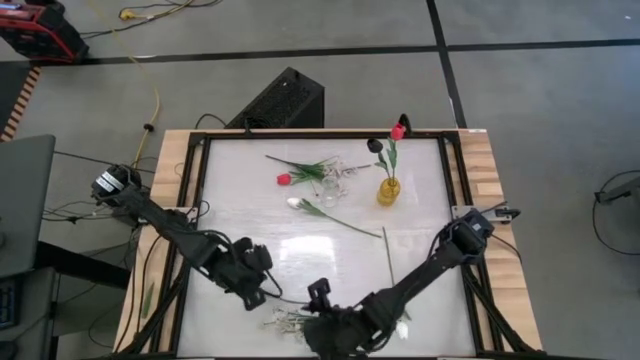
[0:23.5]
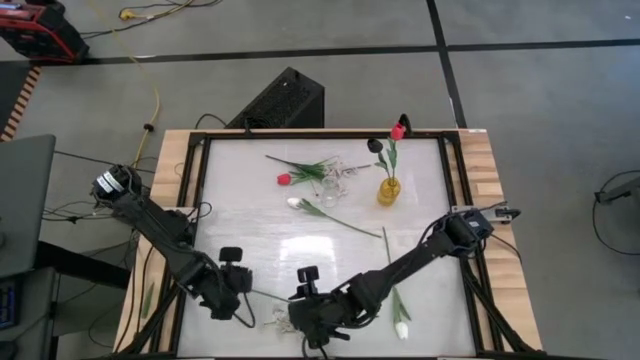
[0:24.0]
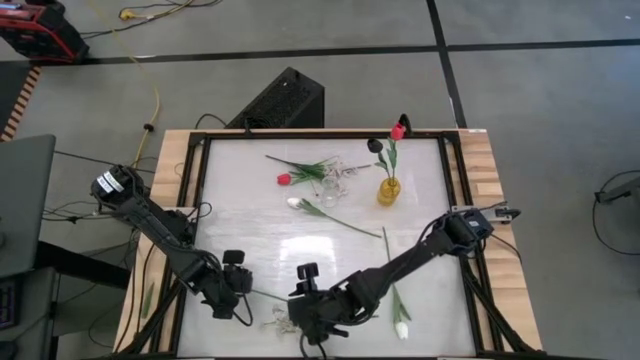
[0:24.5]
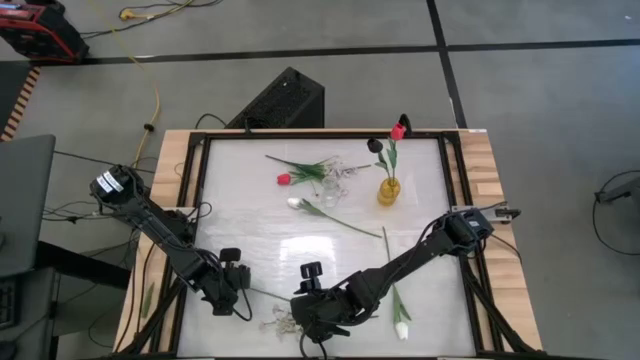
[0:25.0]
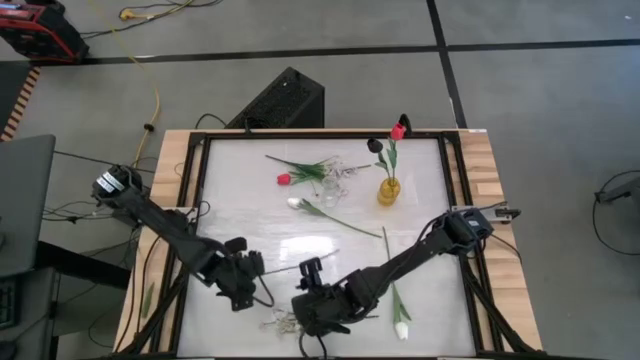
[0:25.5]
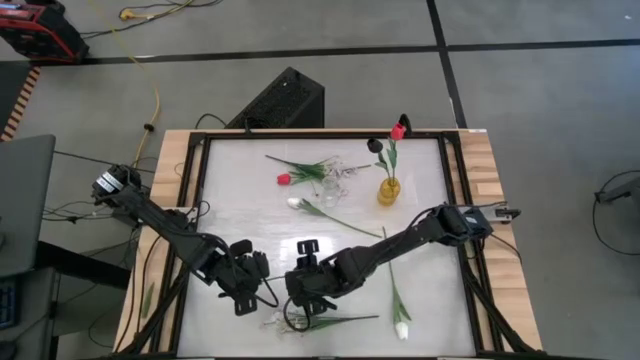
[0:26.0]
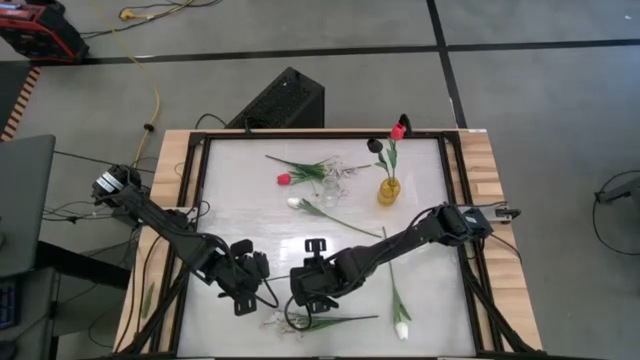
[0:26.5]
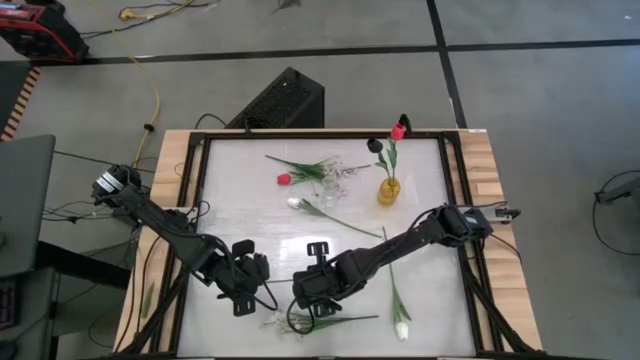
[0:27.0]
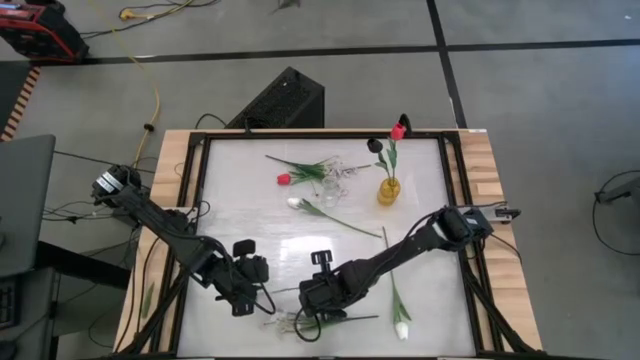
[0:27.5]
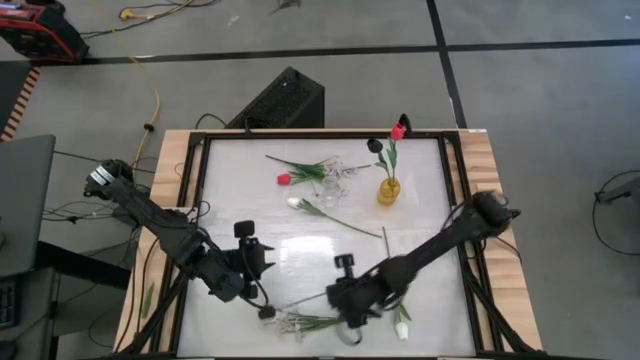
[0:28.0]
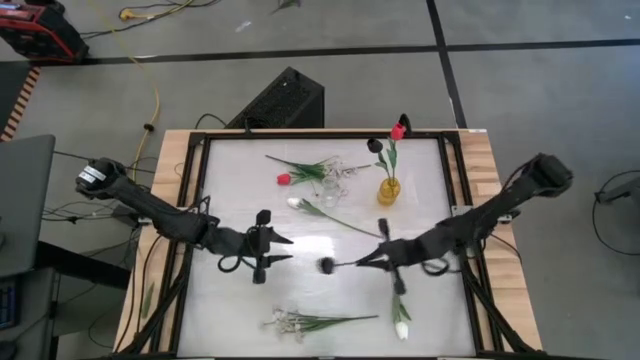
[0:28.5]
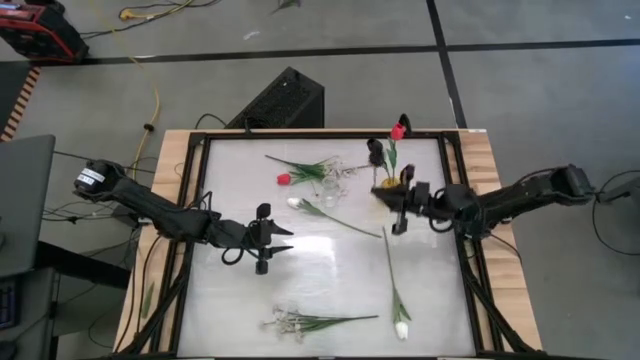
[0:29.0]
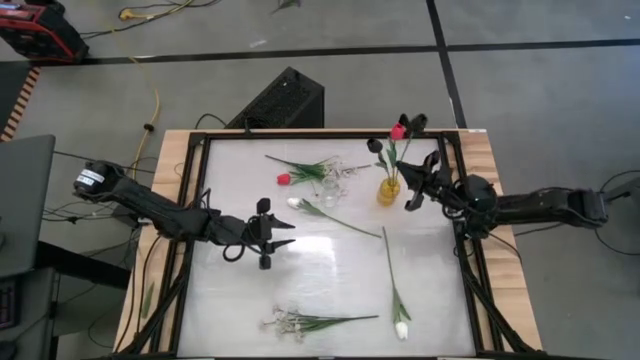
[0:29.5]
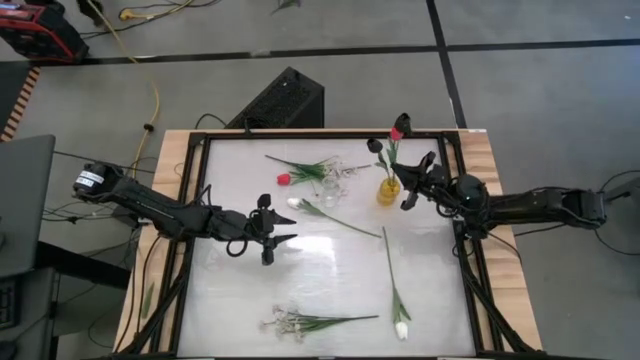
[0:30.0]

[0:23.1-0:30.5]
Task: Sort flowers into vase by color
Put the black flower into the yellow vase

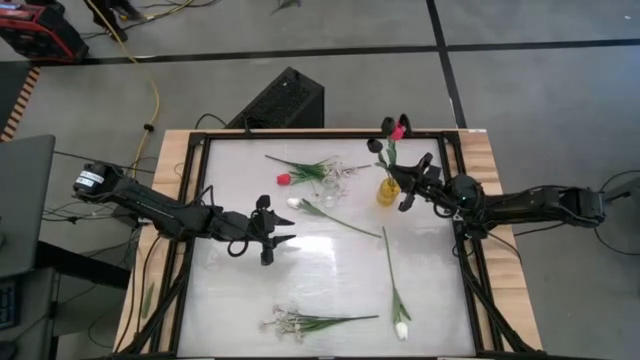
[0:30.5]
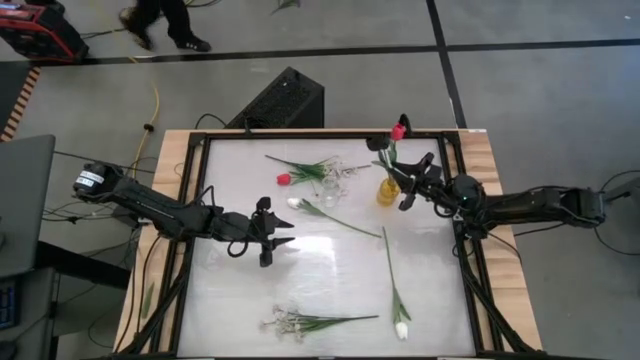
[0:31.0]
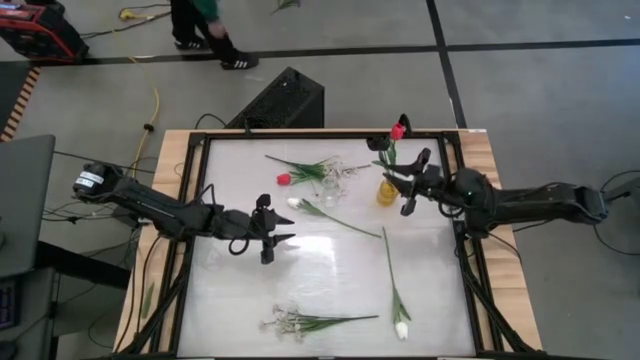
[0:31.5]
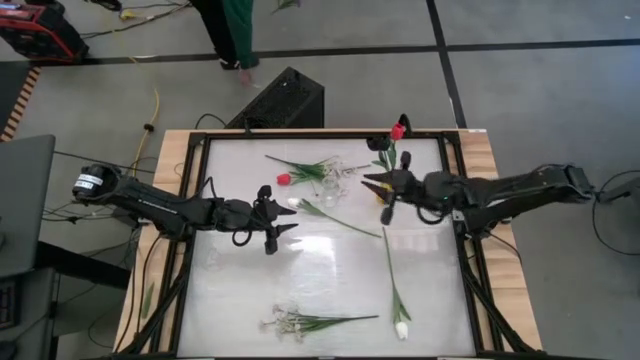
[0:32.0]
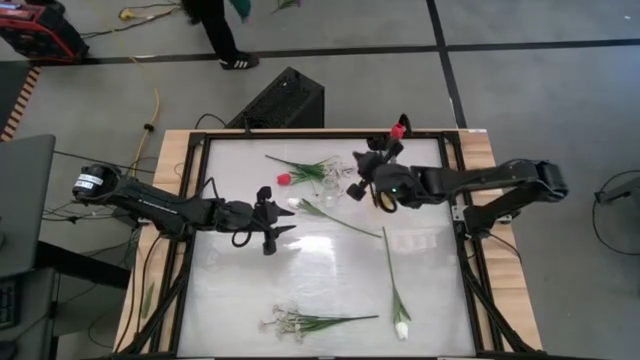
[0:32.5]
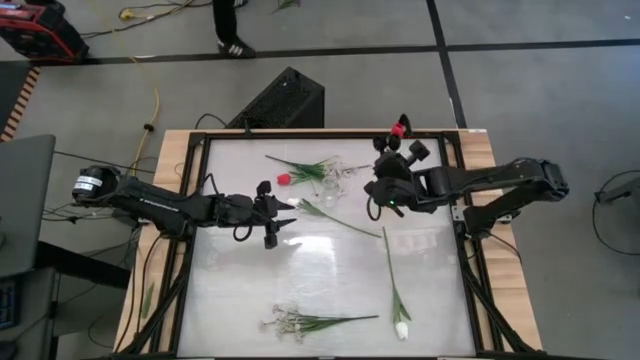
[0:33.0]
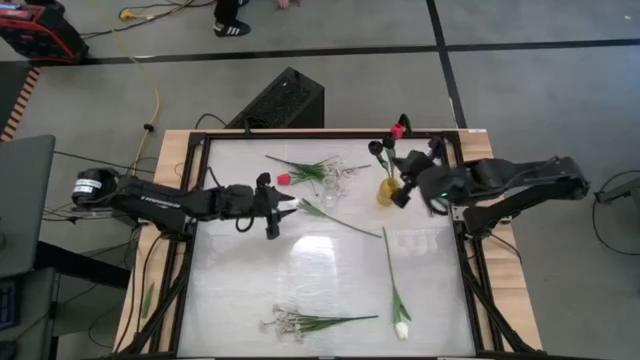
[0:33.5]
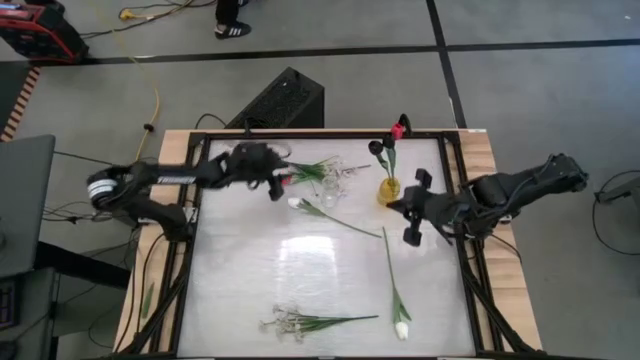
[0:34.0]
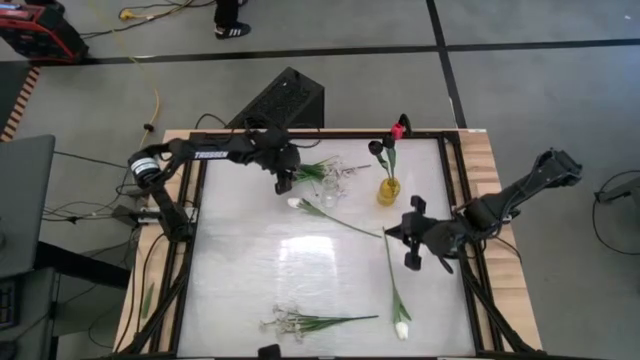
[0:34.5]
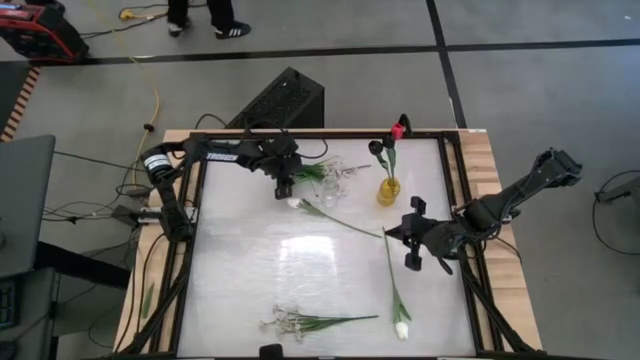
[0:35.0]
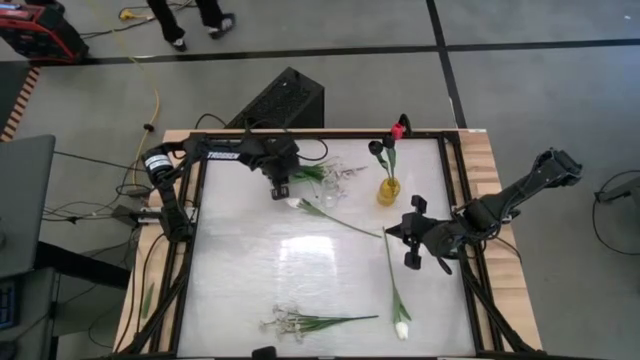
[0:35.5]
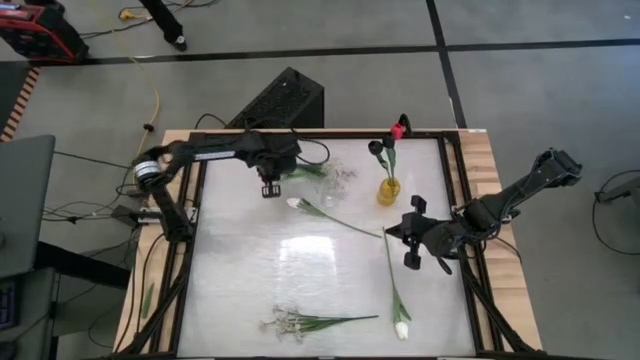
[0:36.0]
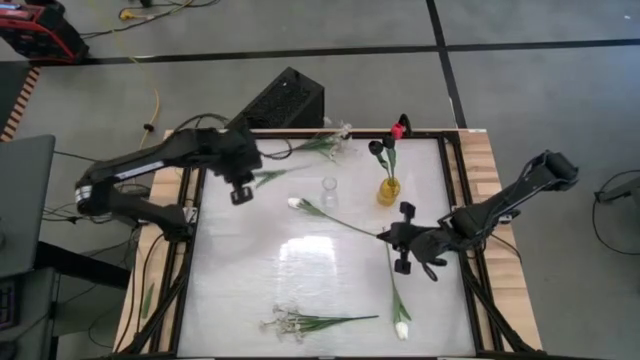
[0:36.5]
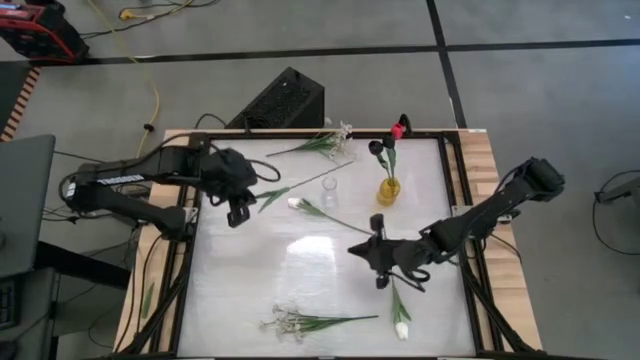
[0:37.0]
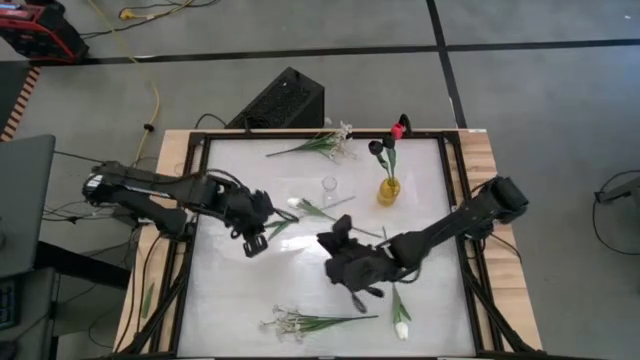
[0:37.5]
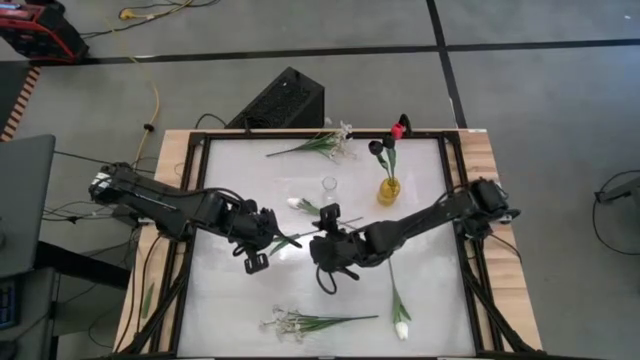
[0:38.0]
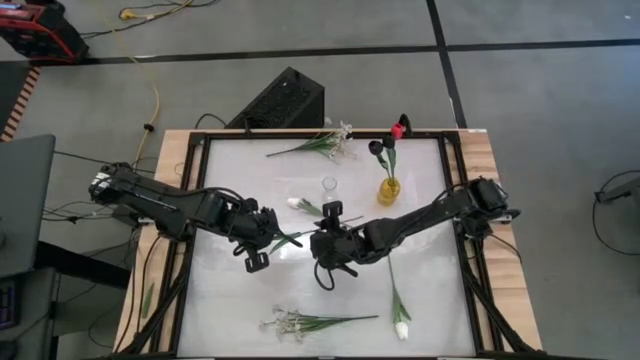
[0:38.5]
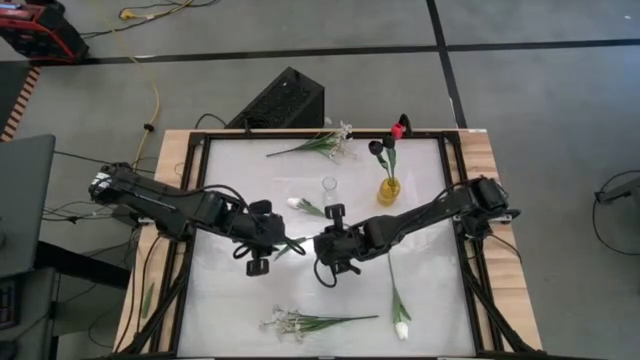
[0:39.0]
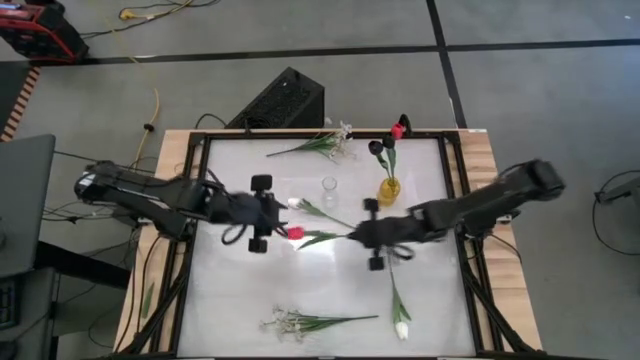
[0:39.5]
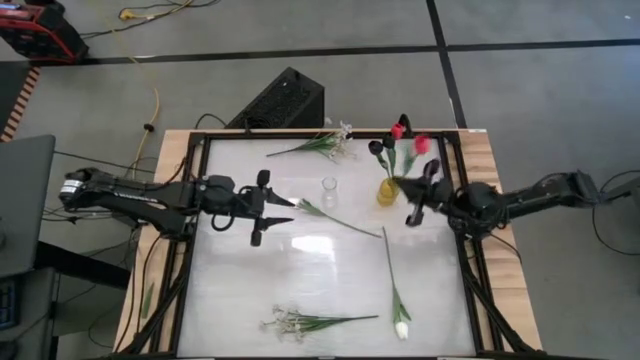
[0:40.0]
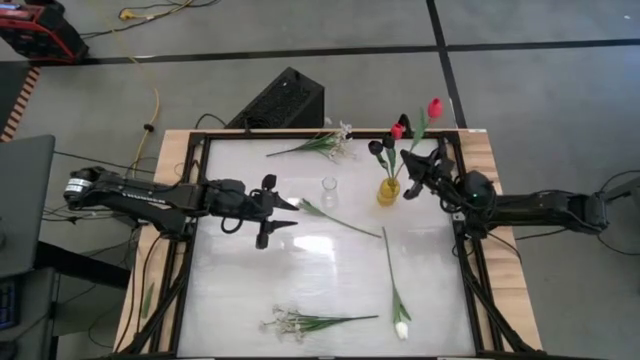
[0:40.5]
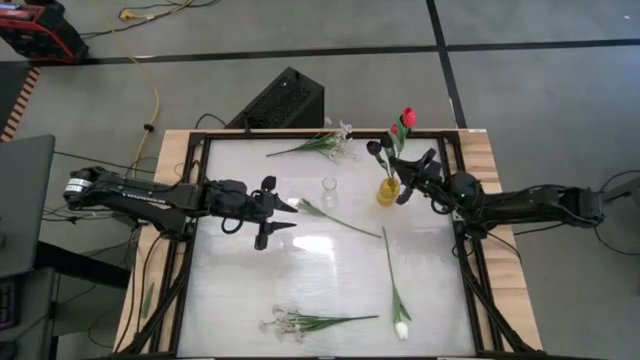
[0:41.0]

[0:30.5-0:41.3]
Put the pink flower into the yellow vase

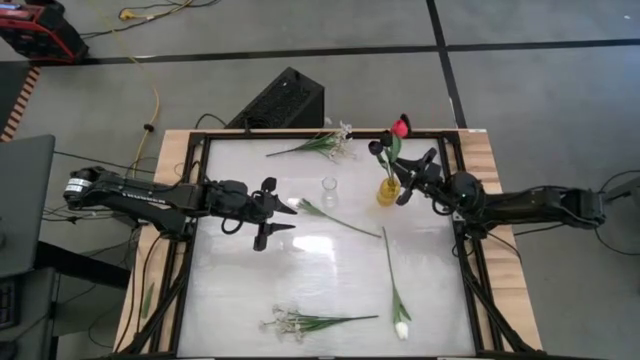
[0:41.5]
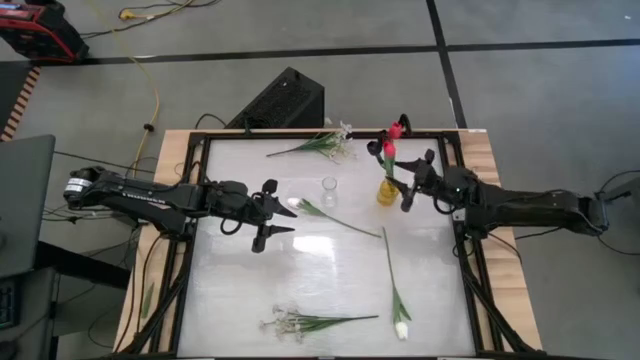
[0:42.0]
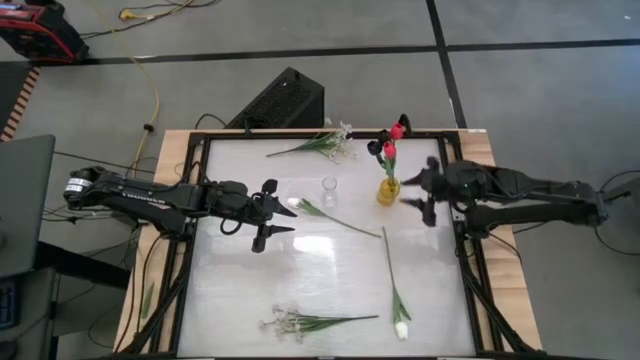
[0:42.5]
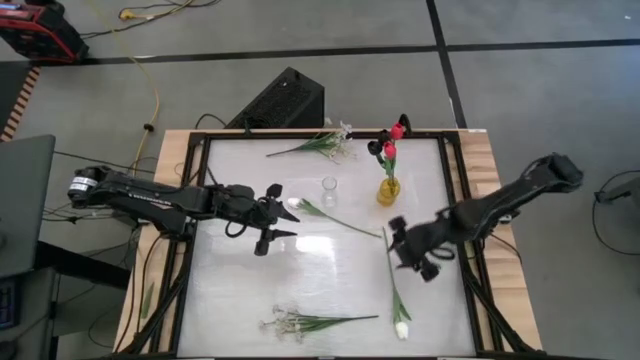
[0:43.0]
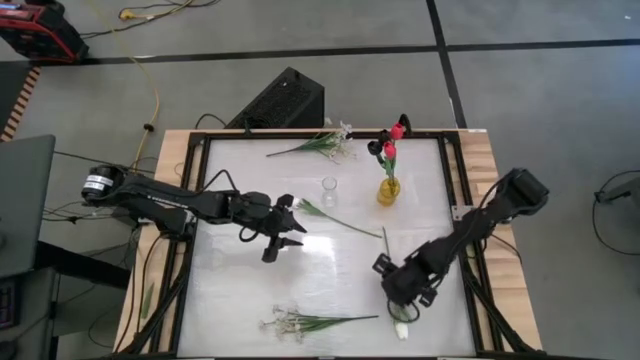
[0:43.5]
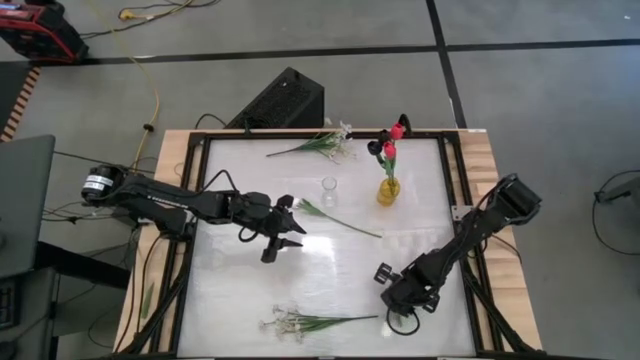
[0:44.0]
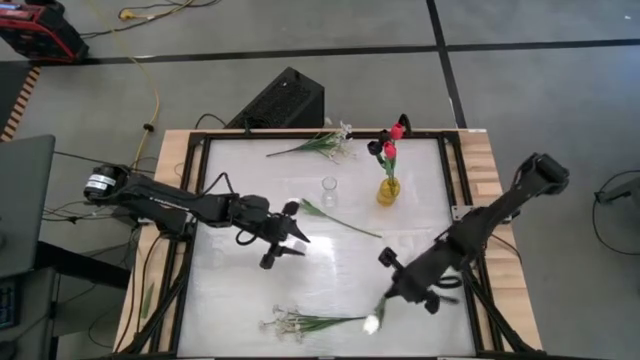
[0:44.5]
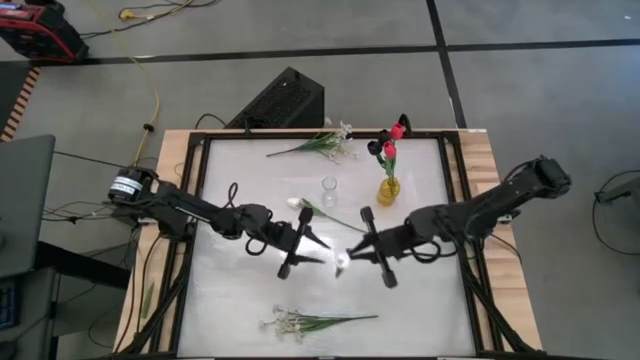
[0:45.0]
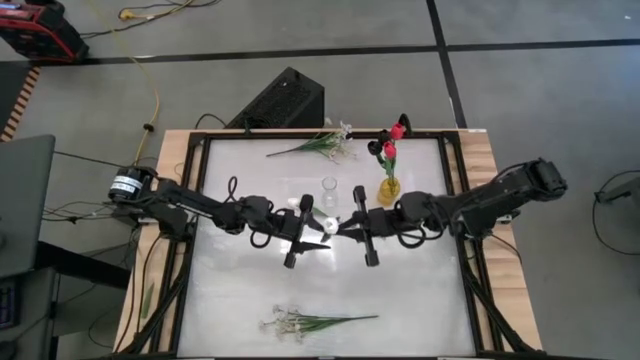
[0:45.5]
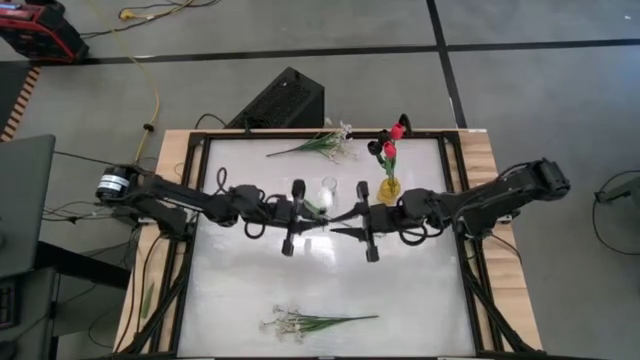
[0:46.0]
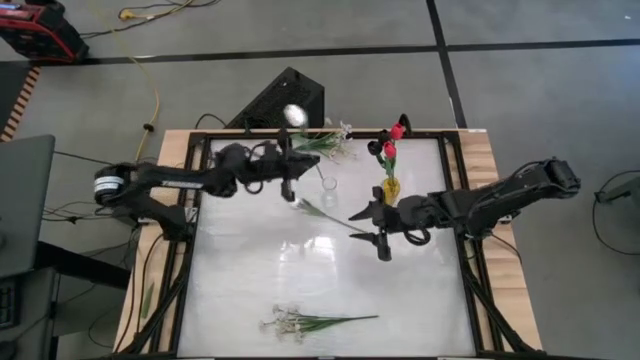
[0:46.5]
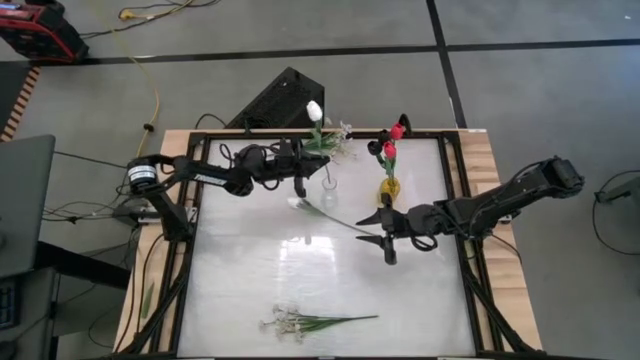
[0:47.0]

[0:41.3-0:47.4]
Put the bottom right white flower into the transparent vase
